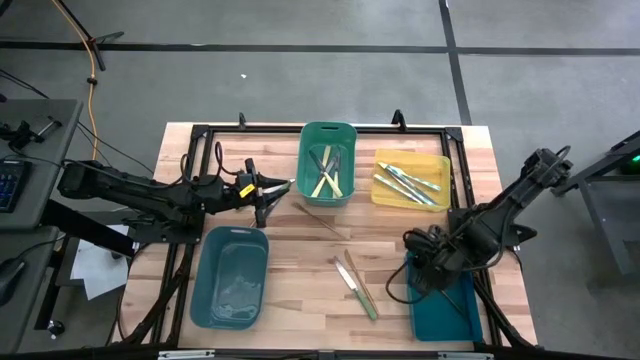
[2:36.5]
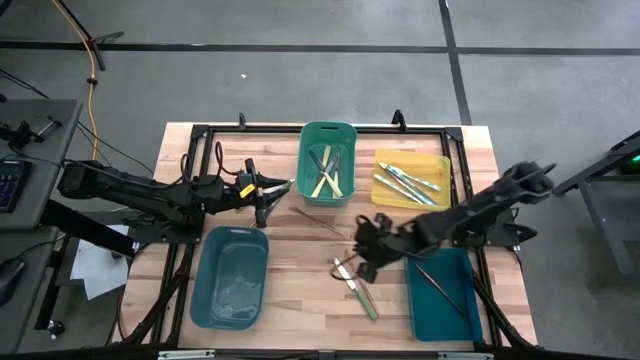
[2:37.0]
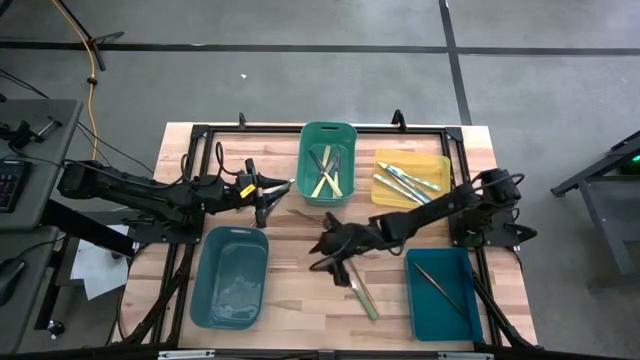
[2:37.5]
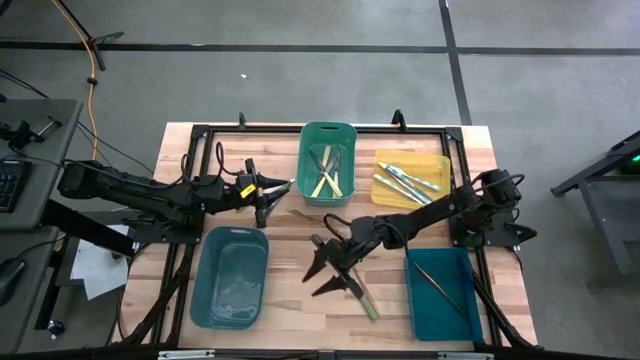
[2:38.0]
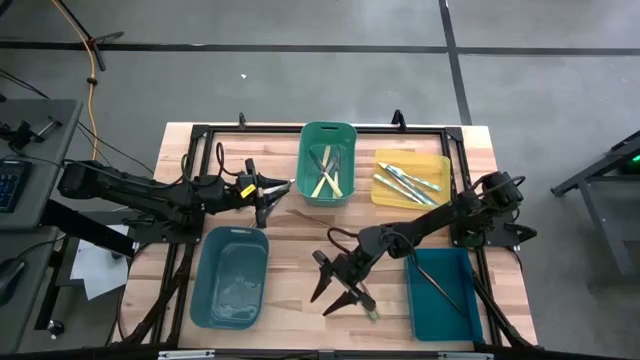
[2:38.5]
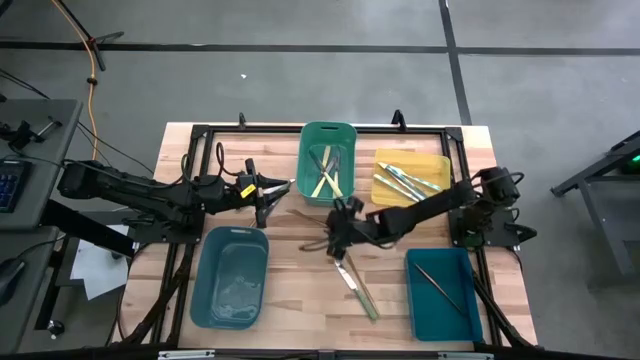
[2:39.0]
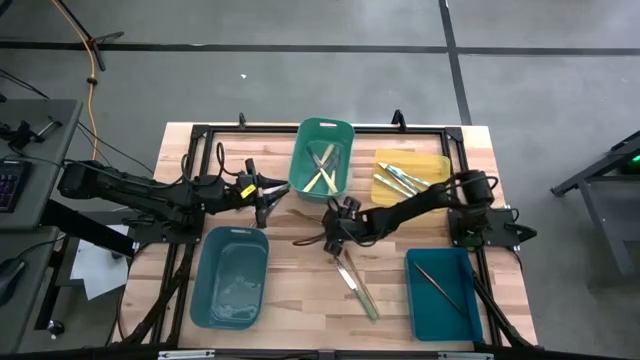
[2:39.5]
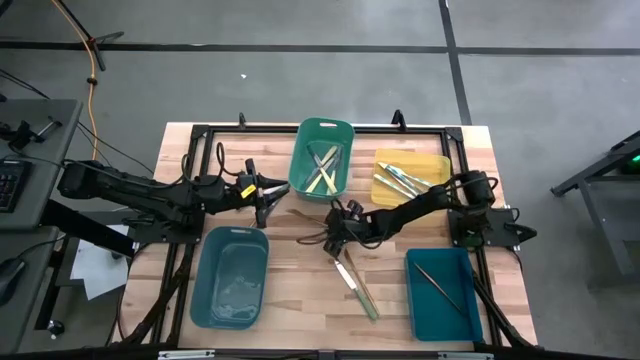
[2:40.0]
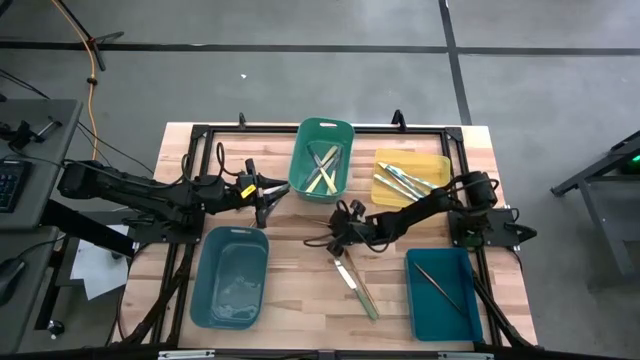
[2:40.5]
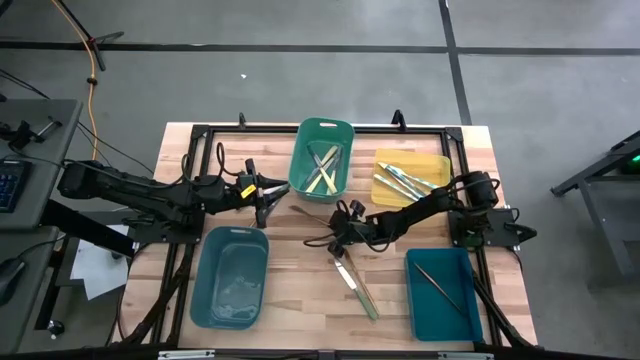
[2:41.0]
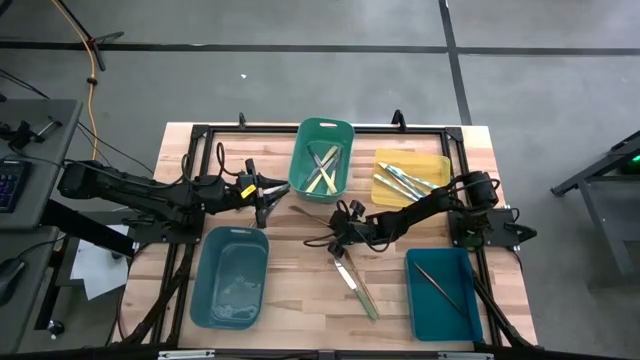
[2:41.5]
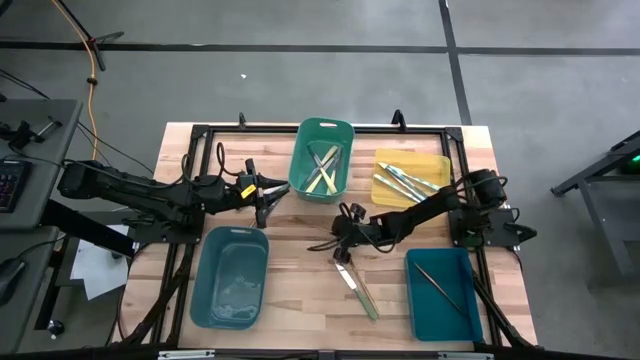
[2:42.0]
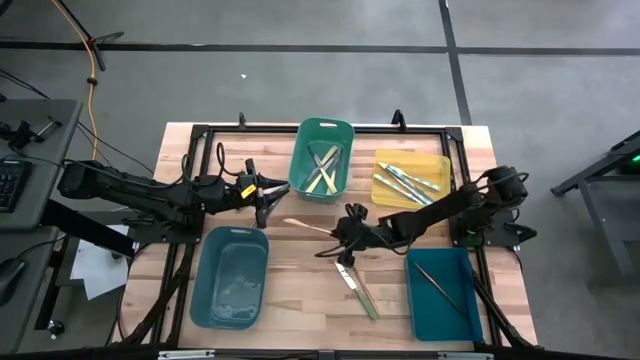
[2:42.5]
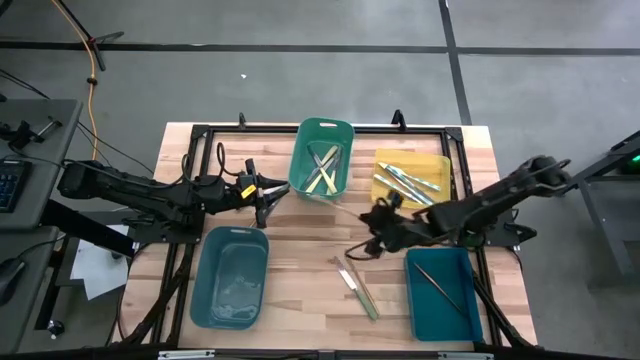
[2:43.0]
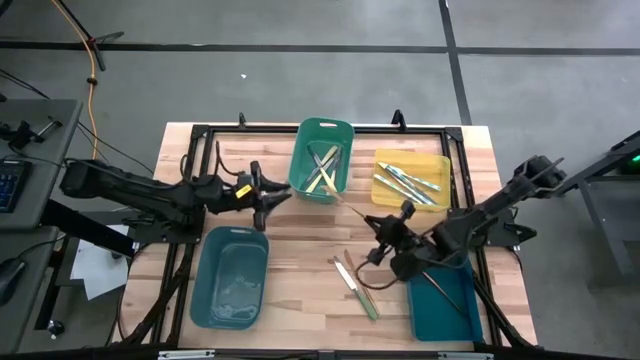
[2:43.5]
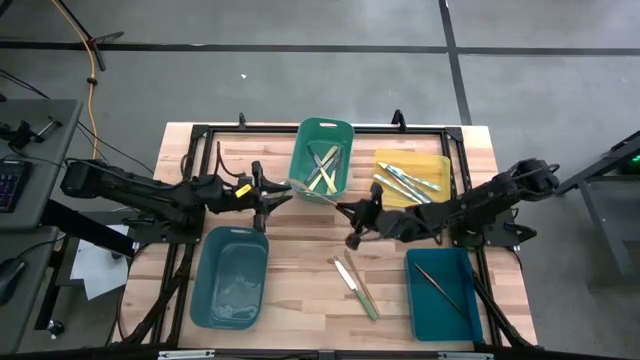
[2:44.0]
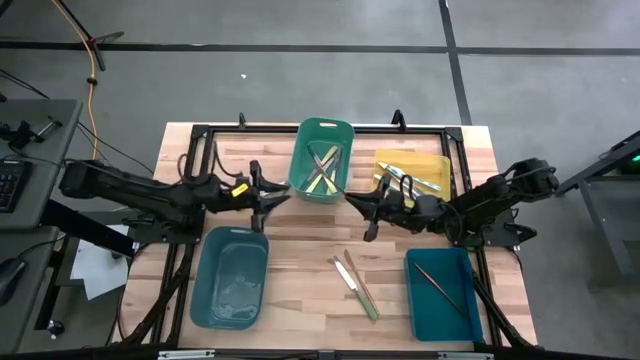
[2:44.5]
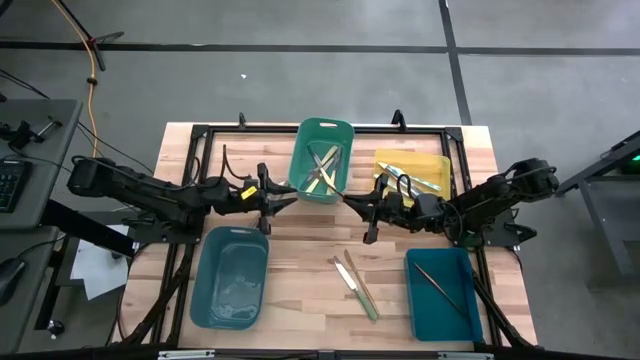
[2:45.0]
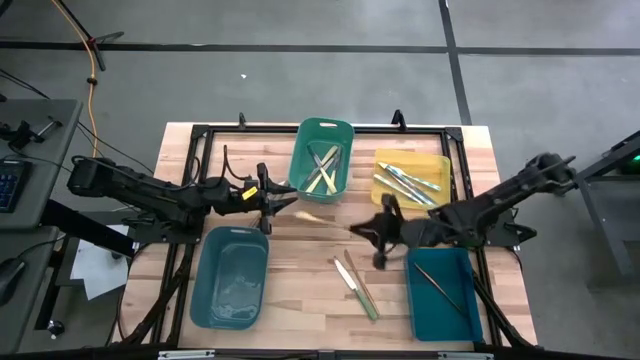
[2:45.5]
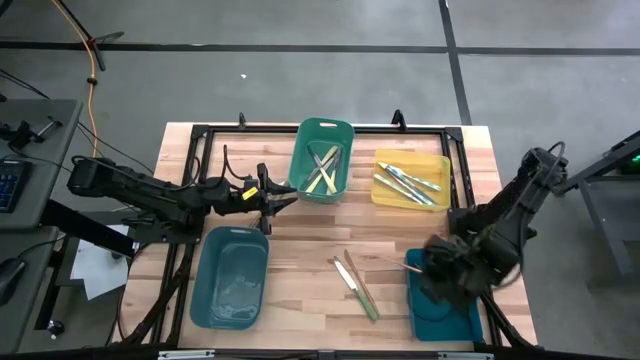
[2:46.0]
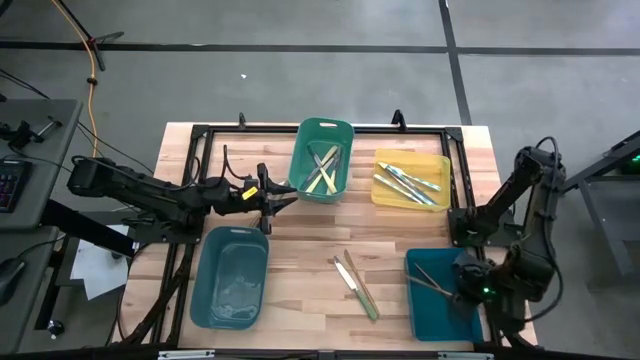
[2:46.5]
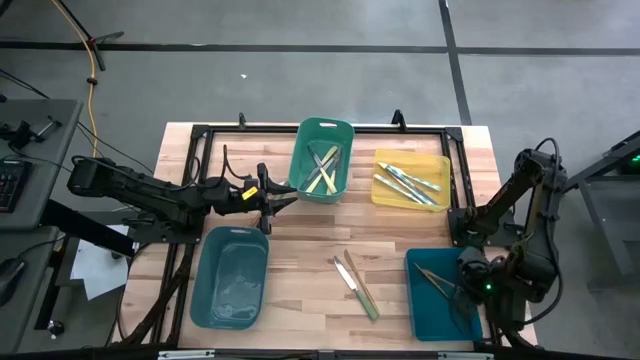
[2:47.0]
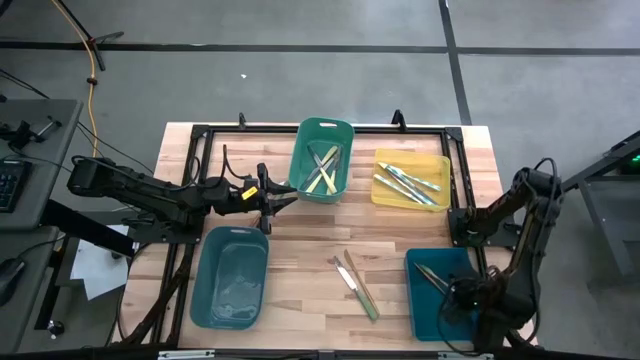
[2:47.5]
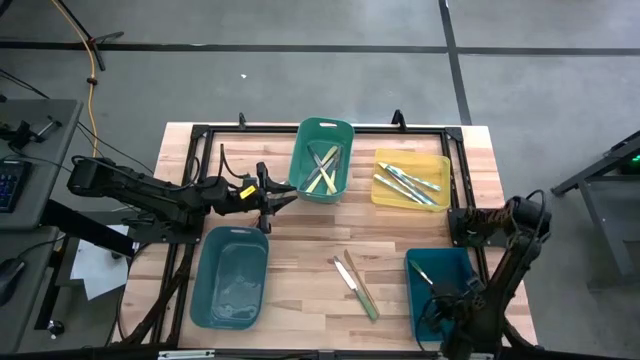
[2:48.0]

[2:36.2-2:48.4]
Task: Sort silverware by color (type)
Put the gold knife into the right blue bin

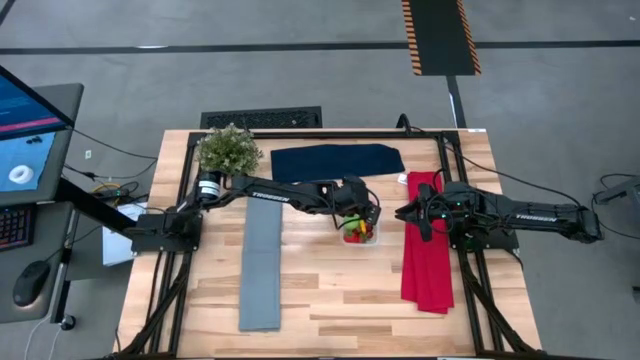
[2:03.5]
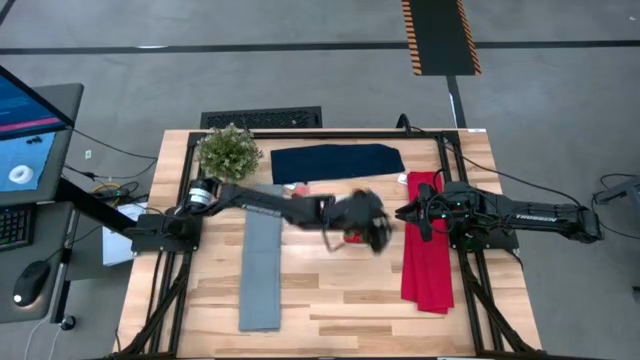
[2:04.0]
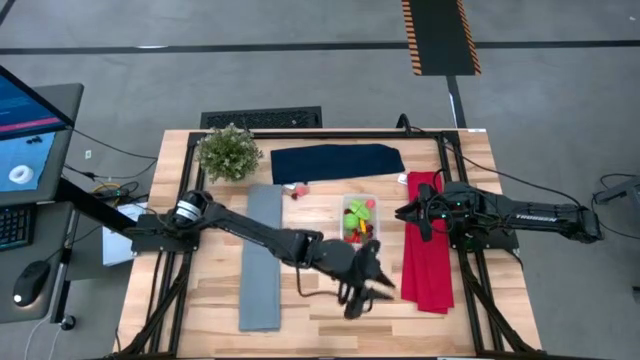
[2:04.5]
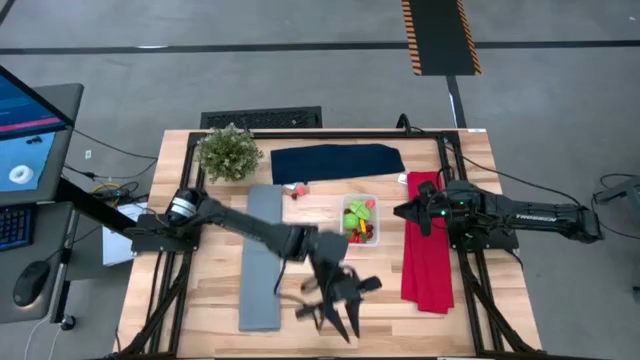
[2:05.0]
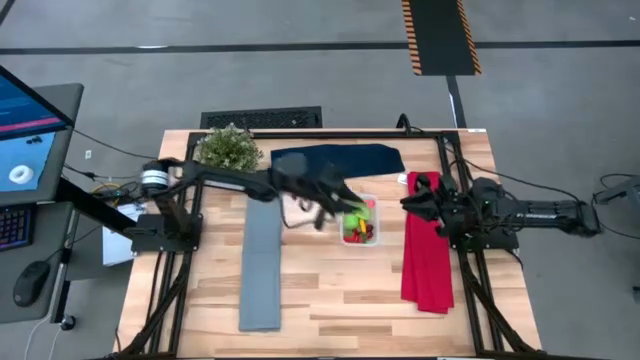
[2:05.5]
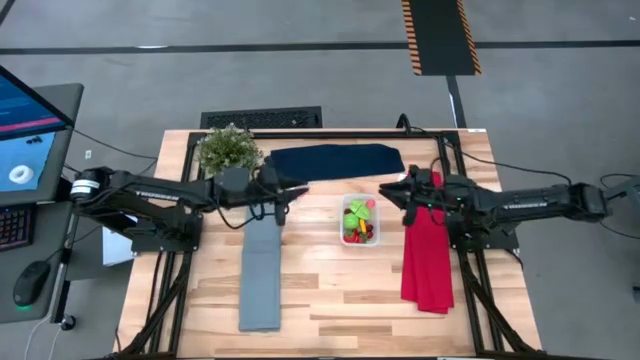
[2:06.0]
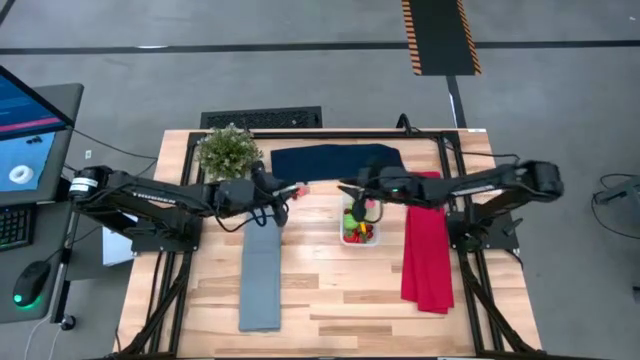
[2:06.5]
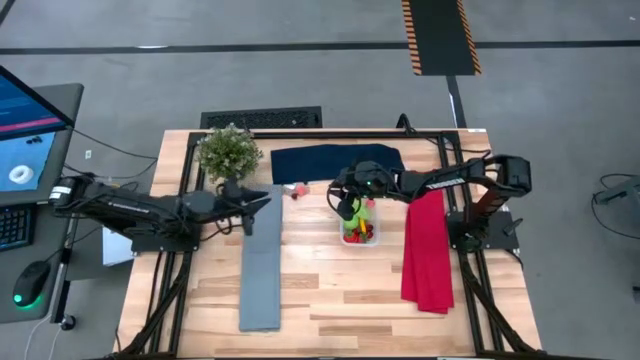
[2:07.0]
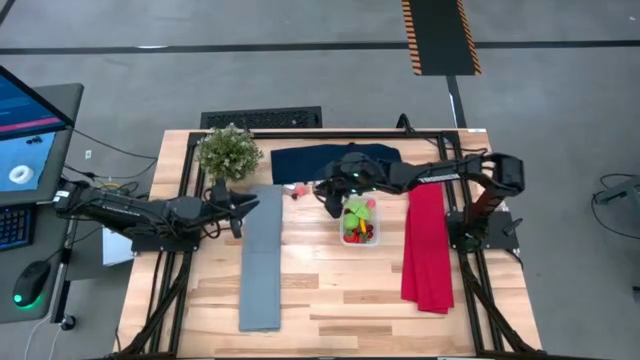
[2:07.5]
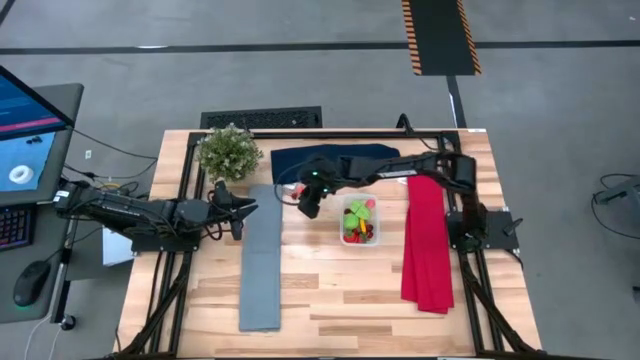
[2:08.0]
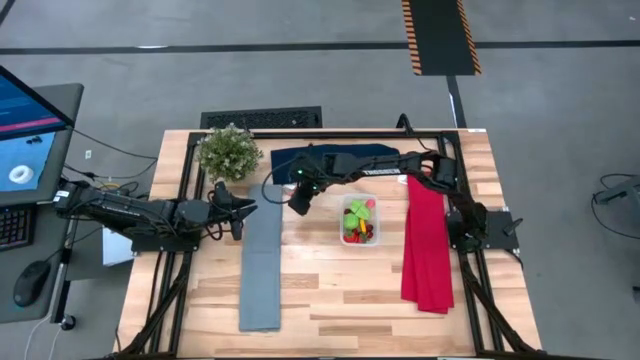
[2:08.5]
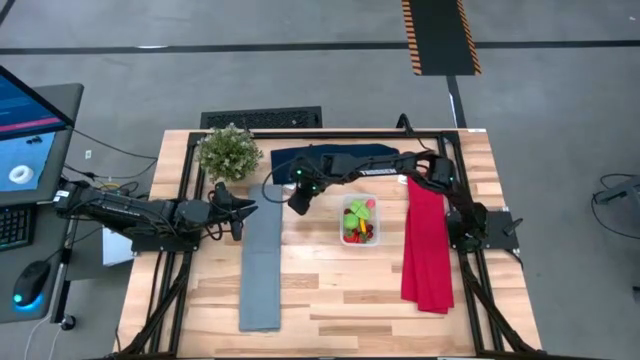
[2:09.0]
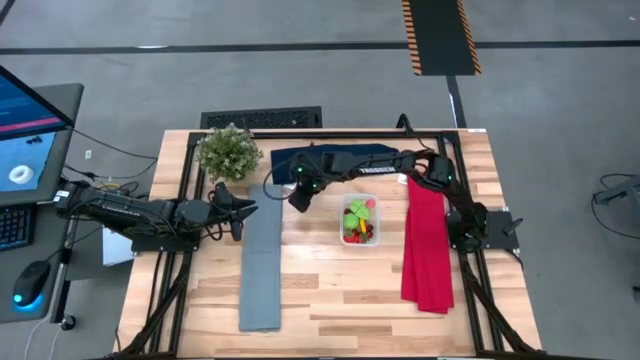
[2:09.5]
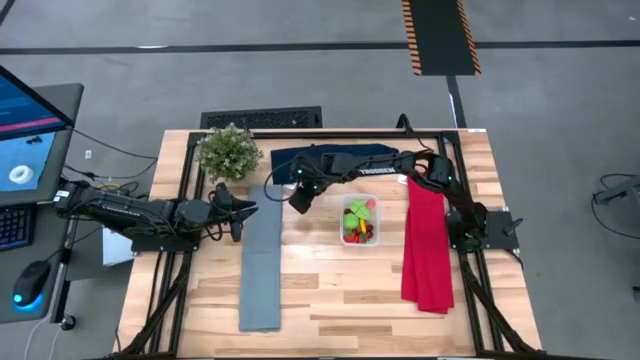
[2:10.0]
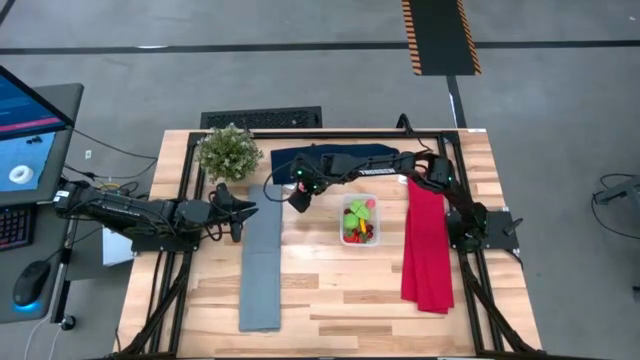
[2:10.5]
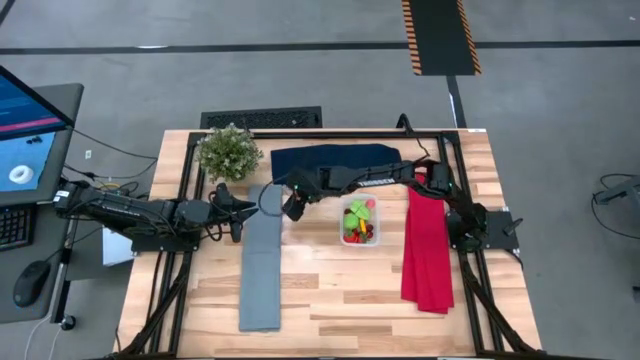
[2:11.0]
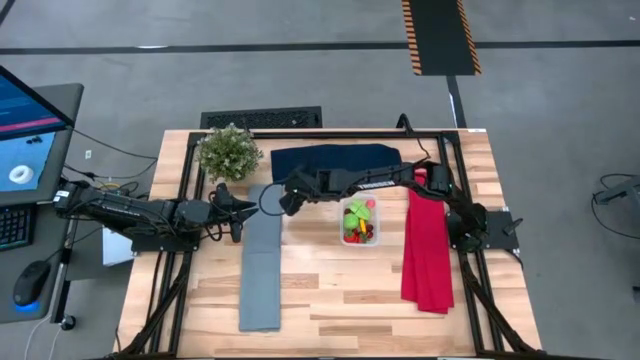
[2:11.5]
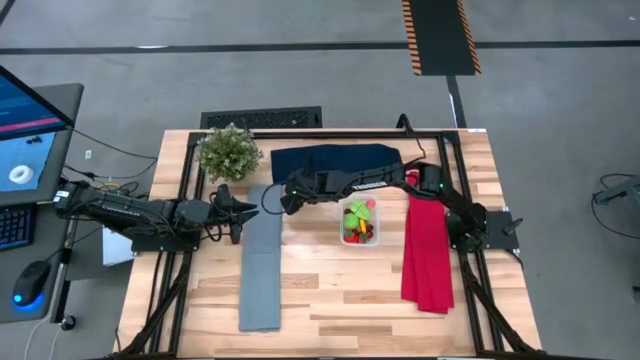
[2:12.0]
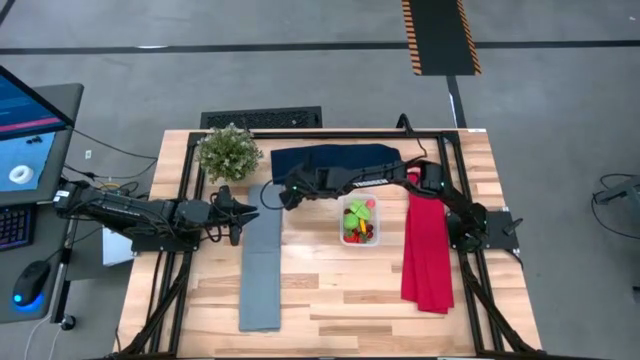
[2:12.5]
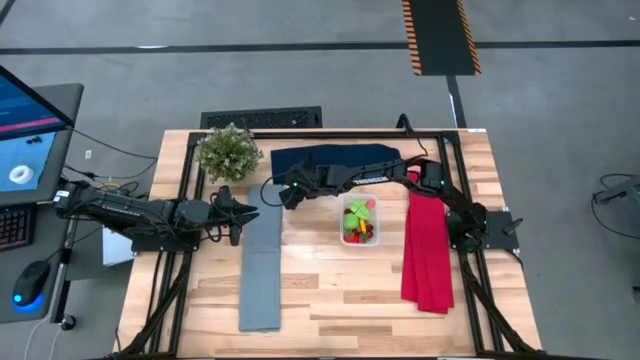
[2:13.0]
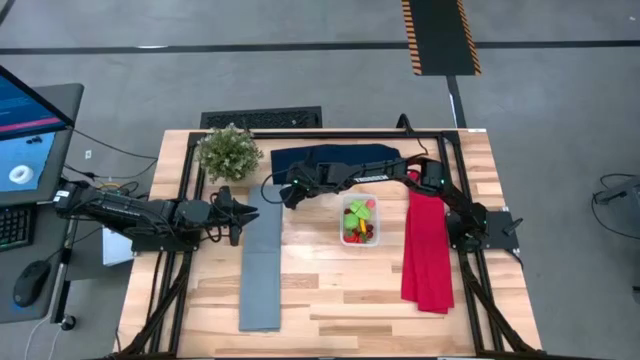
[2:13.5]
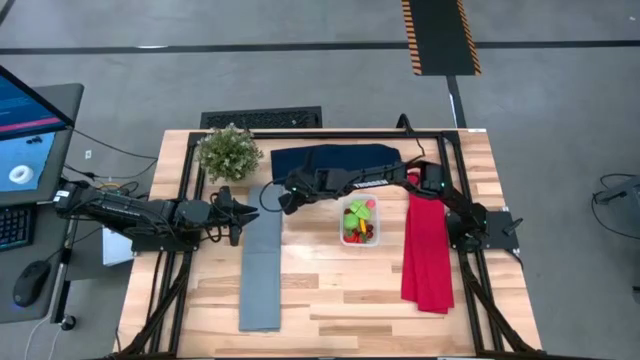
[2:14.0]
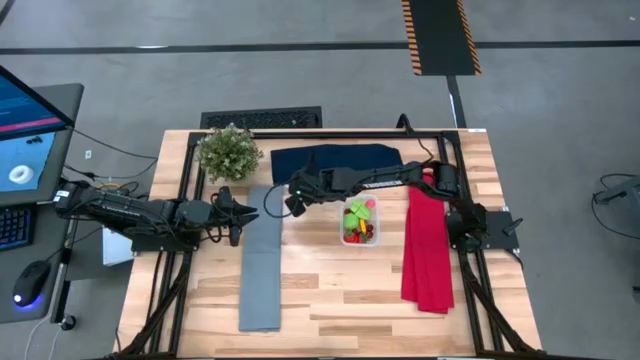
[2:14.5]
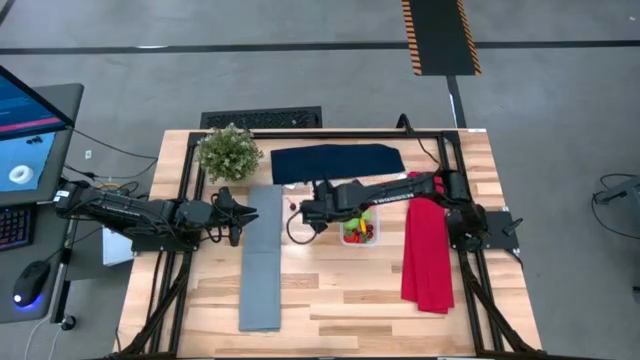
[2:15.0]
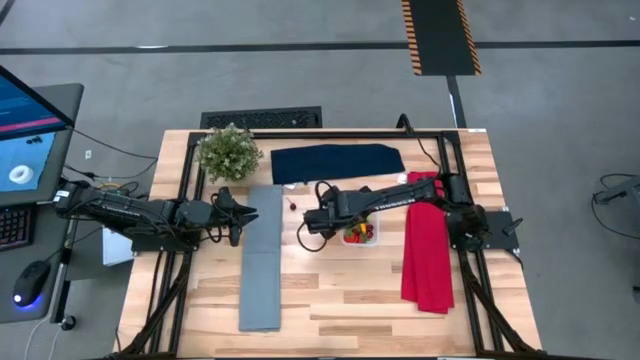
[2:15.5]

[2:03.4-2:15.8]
Task: Pick and placing Produce into tupperware
Put the pink peach into the transparent bin
